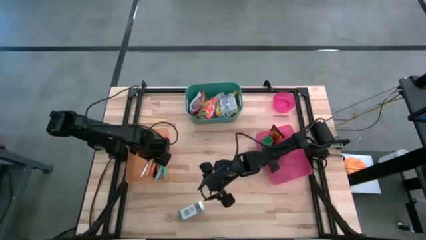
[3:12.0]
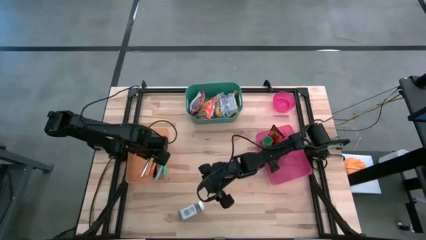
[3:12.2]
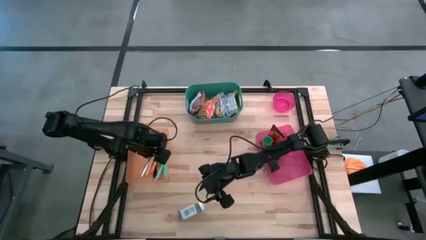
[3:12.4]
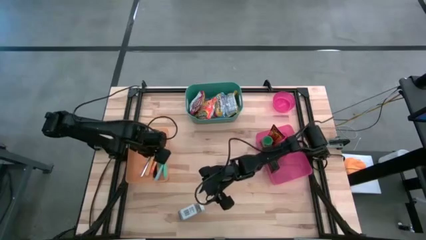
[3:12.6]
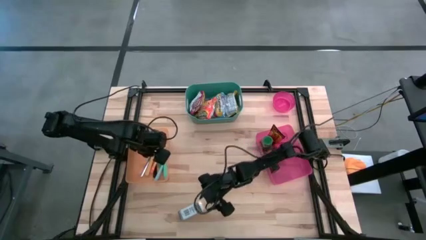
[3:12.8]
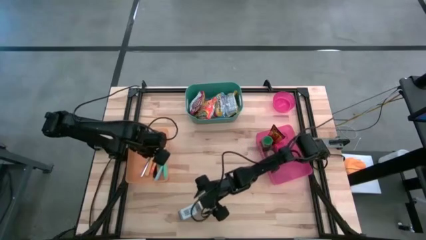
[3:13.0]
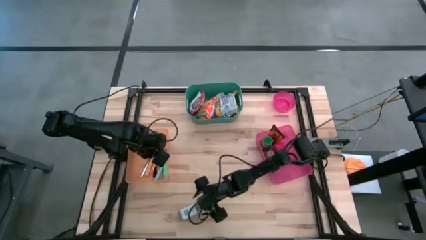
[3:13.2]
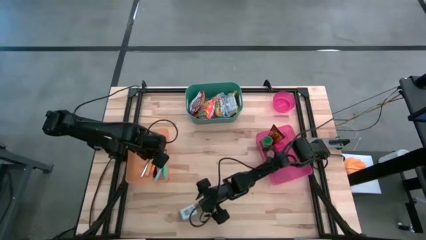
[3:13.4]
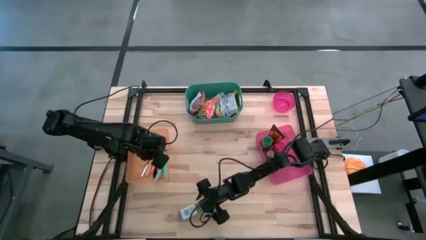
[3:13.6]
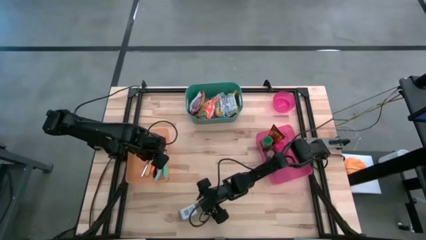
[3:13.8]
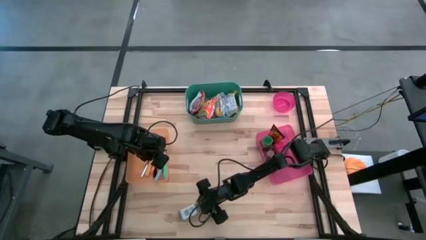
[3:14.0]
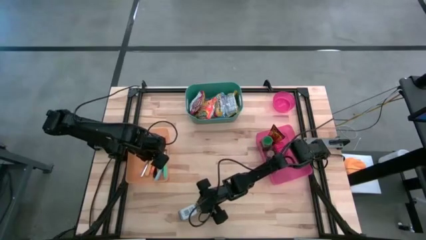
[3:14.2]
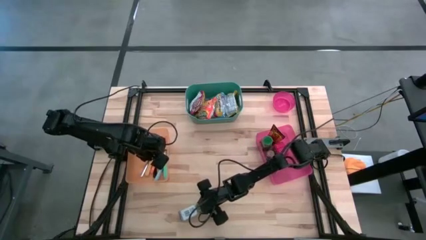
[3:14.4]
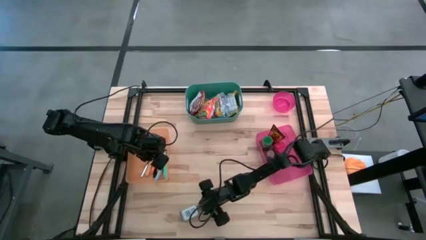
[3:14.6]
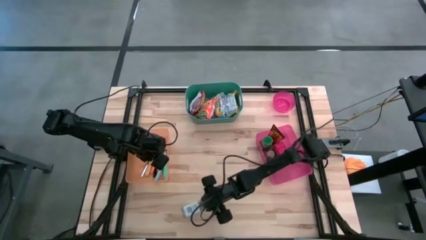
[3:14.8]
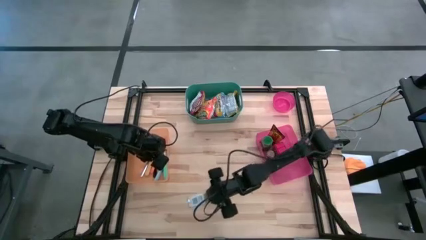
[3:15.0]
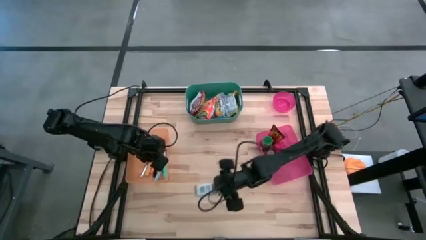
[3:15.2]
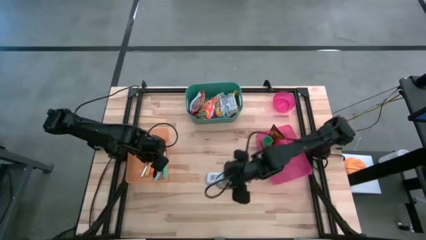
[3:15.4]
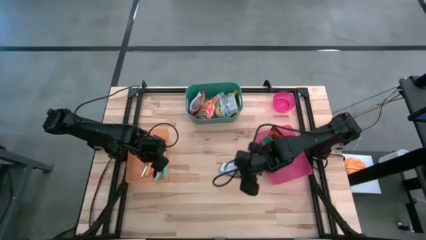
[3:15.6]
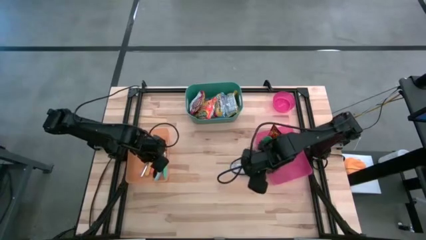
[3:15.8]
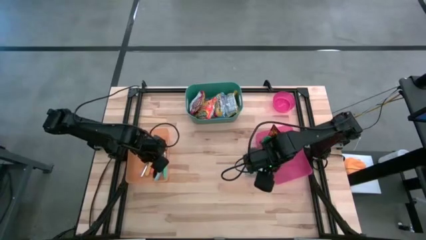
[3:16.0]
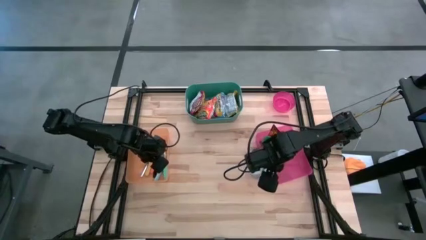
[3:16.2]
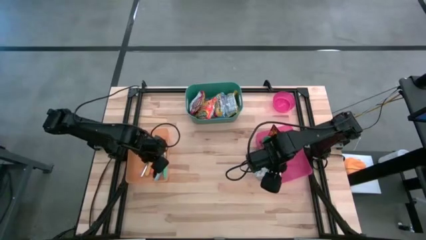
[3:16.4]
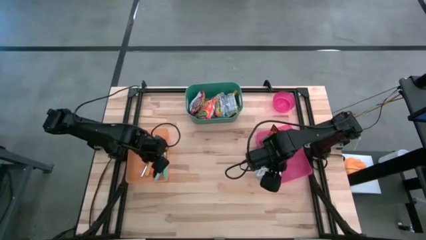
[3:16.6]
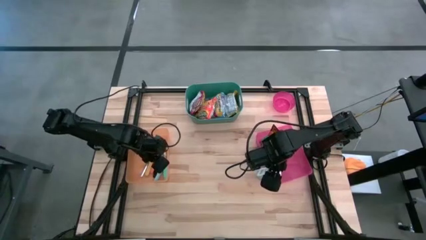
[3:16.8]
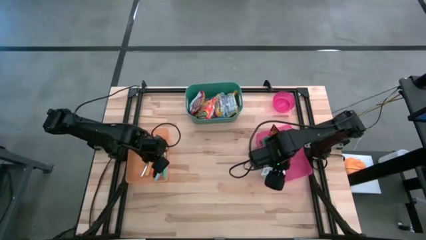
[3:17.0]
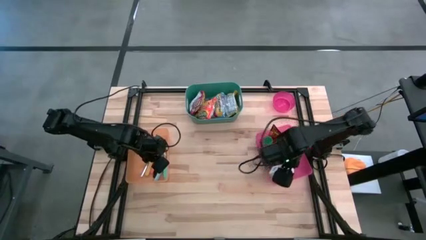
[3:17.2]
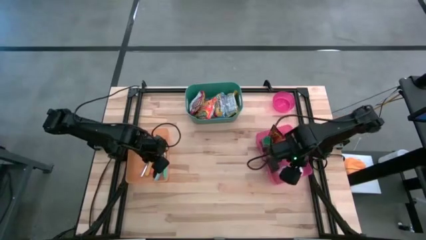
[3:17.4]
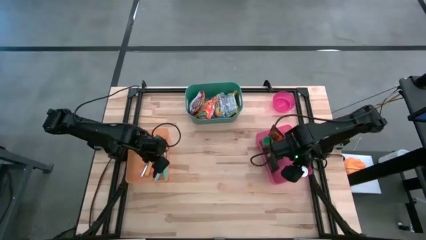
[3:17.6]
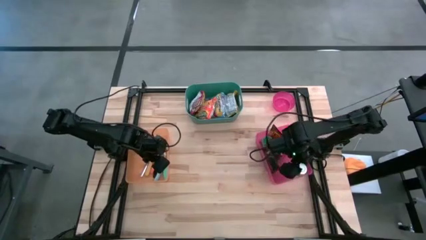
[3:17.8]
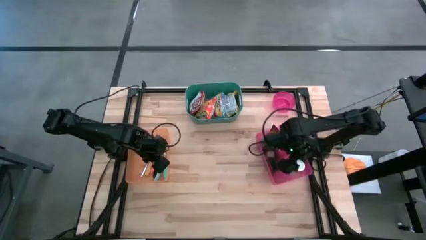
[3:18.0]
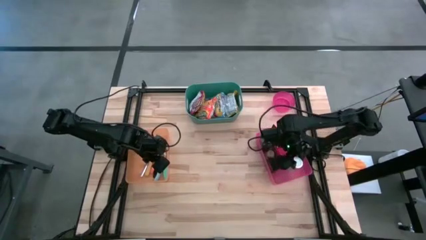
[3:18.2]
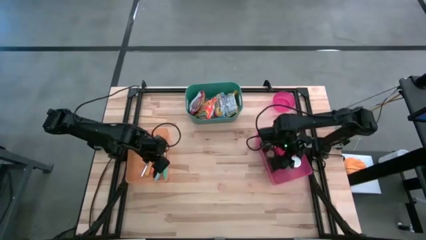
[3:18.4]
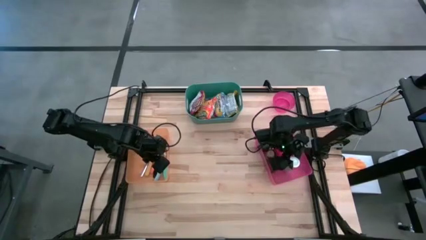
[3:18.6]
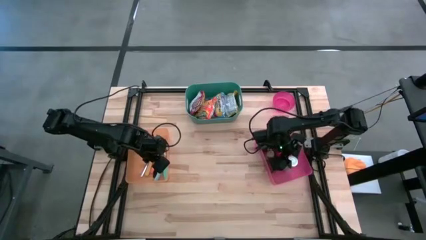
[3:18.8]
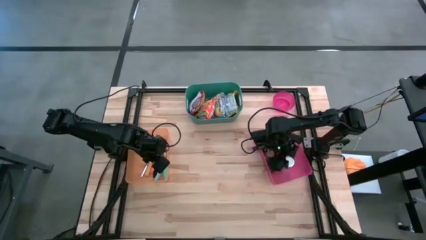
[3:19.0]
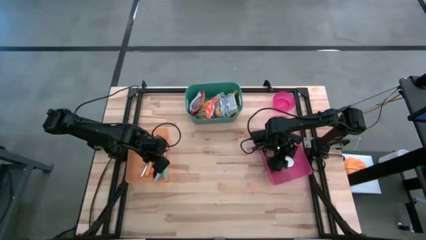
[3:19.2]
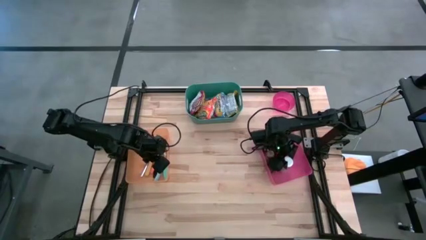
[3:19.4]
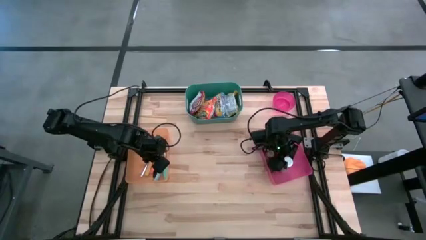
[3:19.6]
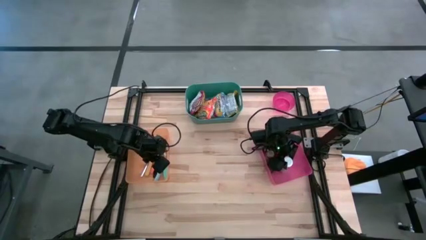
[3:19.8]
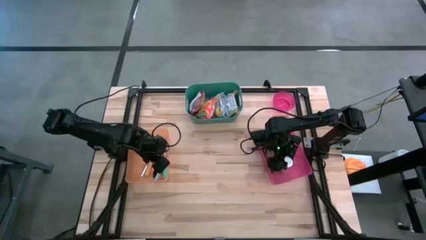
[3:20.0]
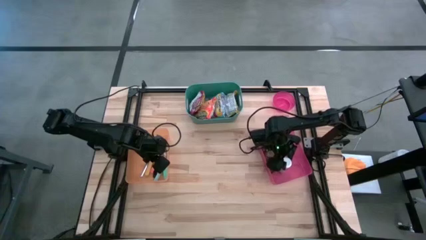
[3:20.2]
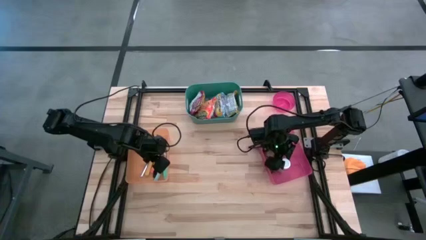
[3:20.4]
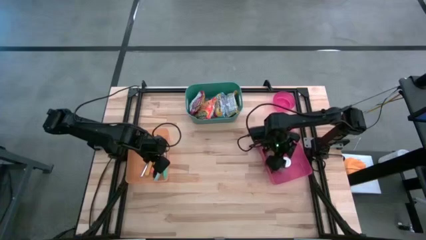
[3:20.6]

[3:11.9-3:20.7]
Put the white spice bottle into the pink bin

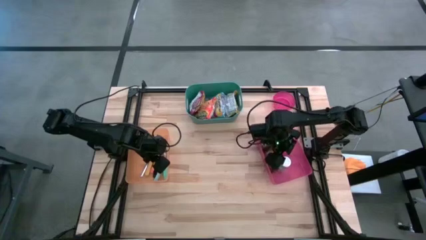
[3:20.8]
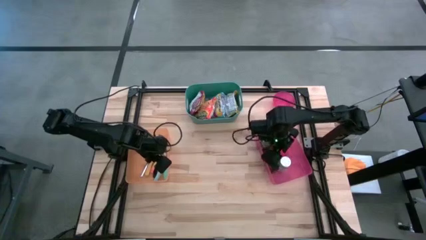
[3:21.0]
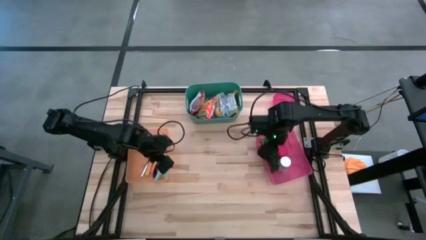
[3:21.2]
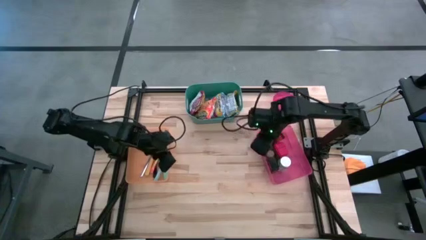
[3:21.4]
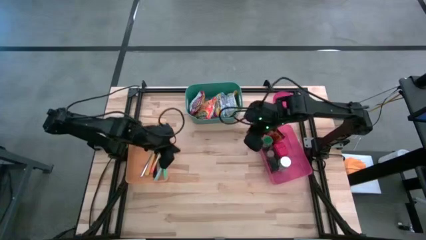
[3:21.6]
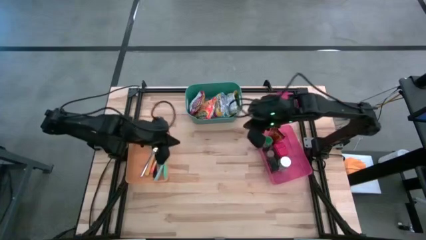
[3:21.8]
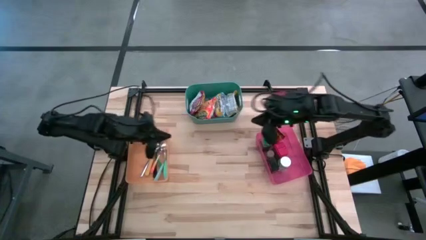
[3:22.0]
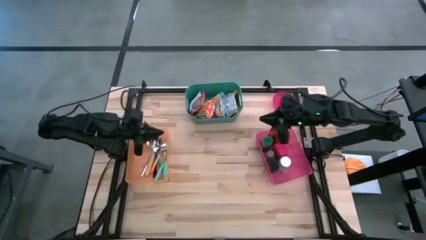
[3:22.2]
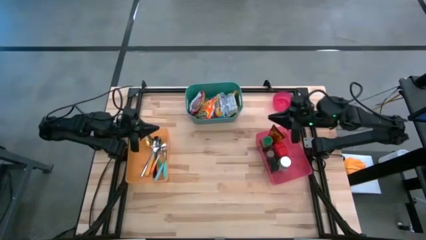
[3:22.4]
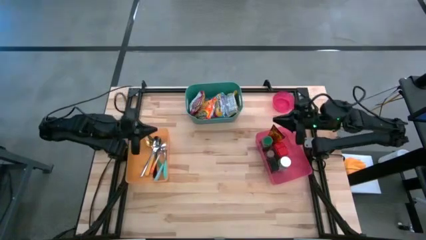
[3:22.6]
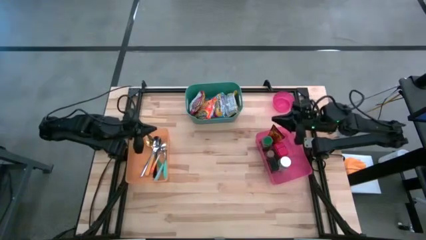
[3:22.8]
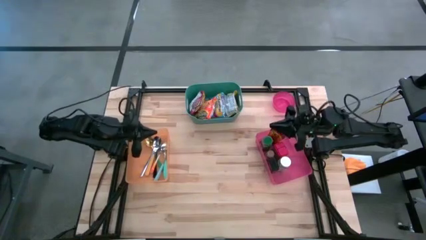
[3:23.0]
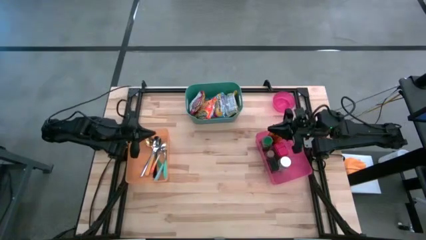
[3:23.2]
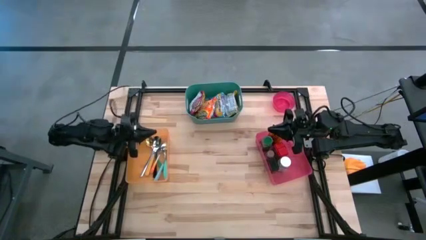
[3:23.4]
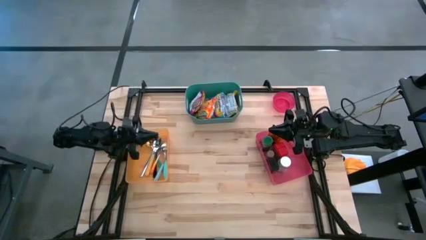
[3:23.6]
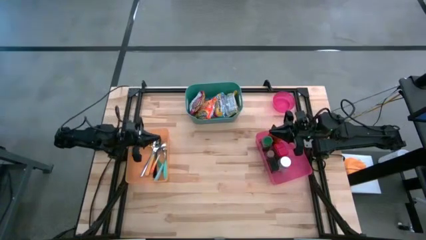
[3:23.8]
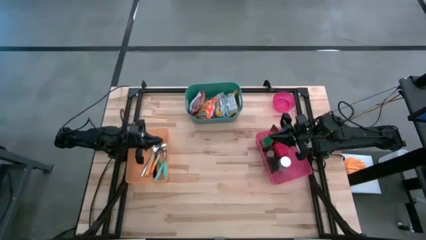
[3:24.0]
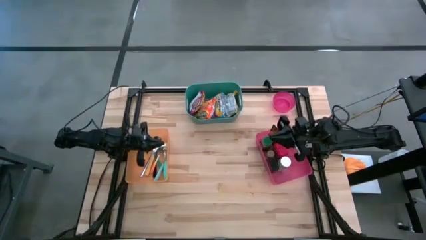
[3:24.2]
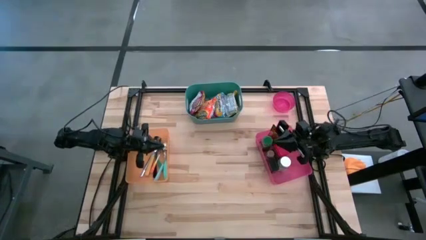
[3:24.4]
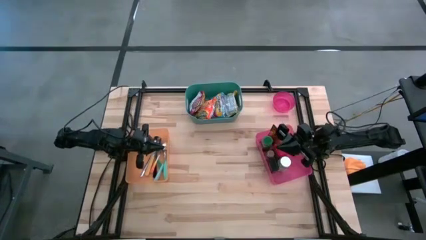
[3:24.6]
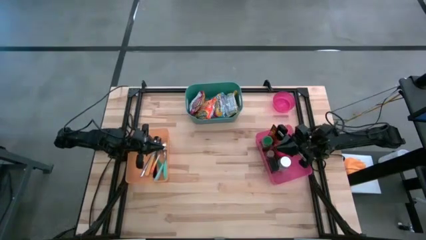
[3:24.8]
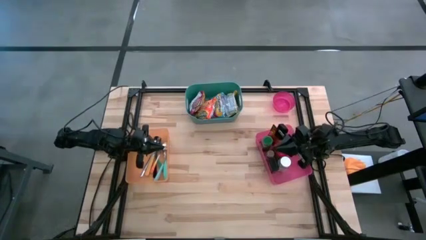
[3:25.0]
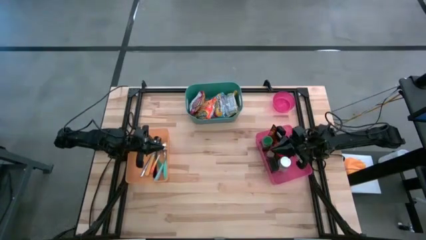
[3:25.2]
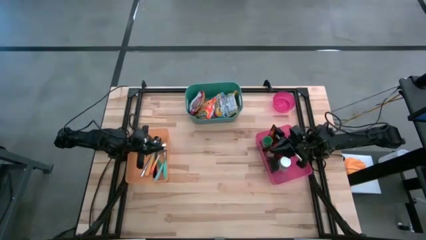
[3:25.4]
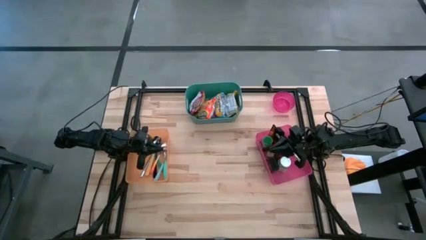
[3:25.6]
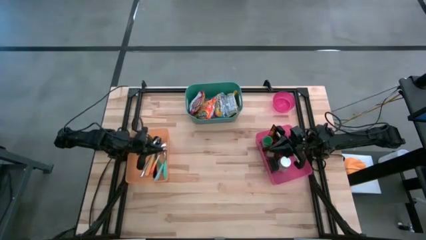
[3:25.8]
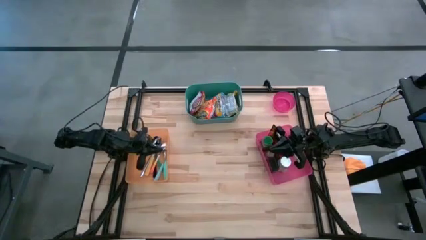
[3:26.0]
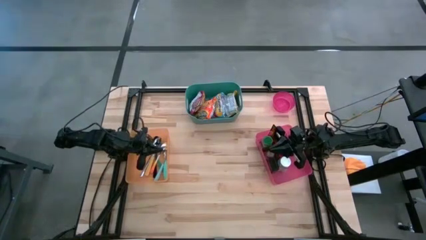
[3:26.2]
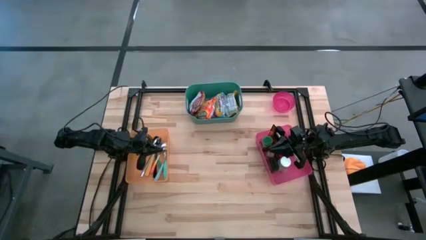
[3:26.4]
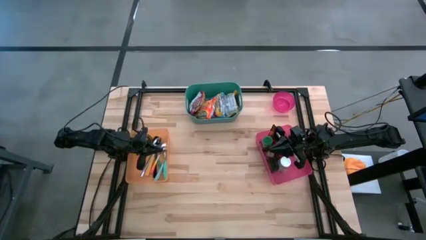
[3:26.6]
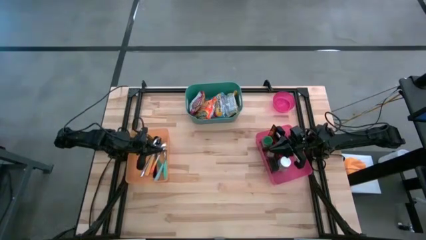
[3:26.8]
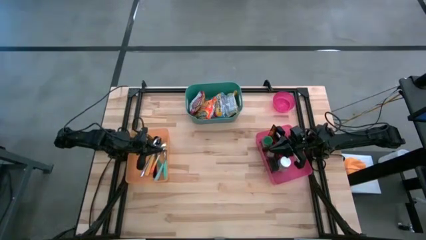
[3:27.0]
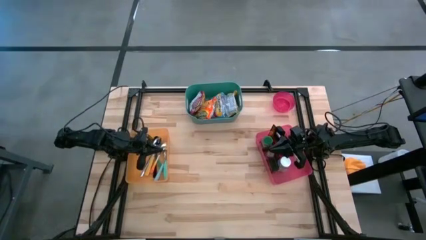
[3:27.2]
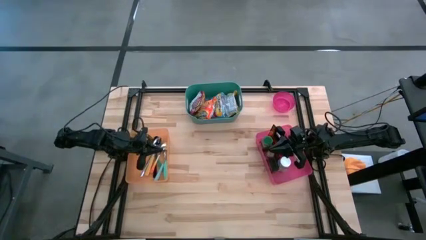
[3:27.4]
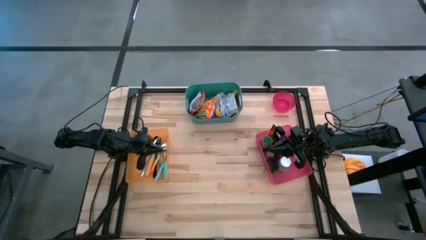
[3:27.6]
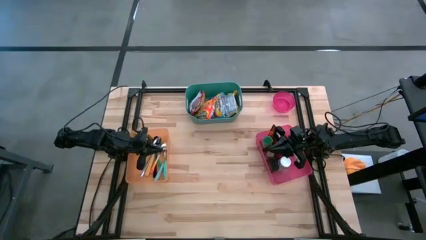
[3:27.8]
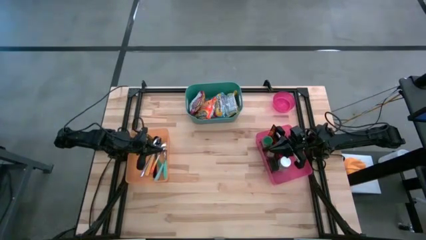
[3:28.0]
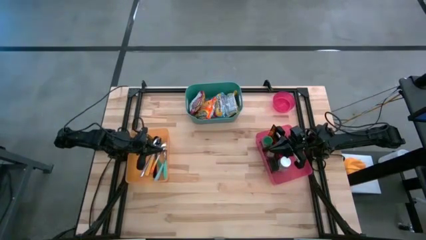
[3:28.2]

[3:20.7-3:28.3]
Return to Home Position
